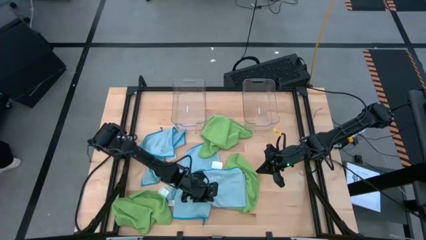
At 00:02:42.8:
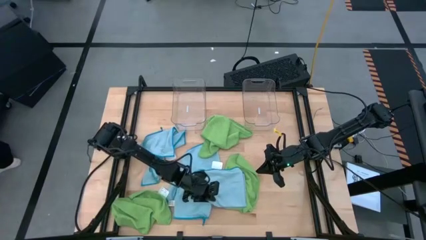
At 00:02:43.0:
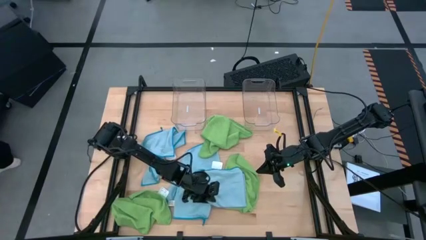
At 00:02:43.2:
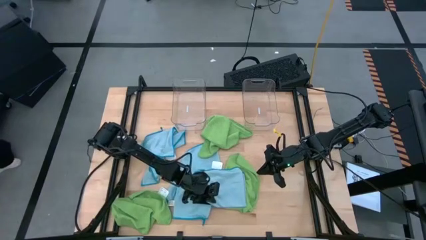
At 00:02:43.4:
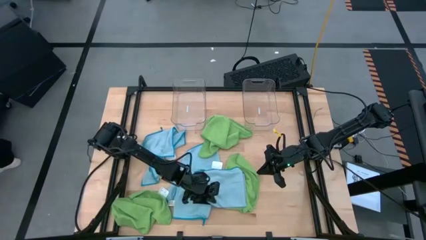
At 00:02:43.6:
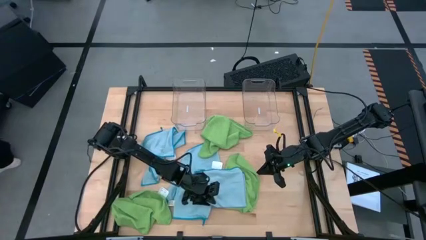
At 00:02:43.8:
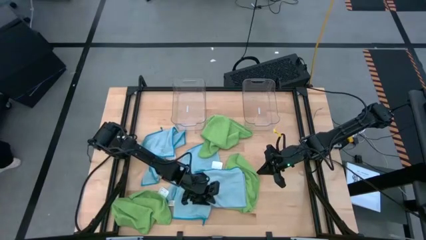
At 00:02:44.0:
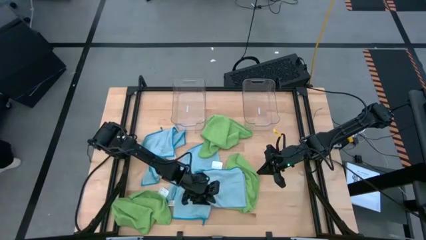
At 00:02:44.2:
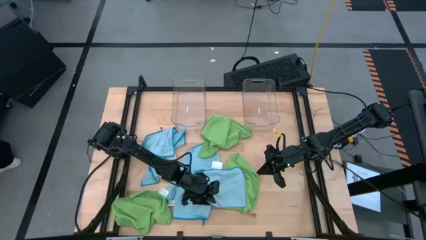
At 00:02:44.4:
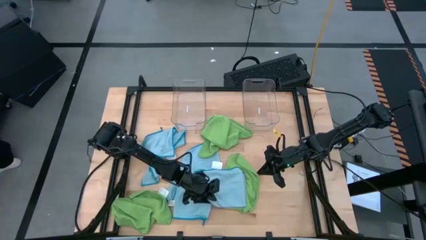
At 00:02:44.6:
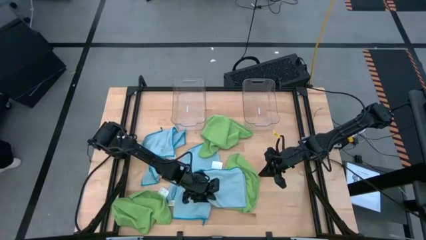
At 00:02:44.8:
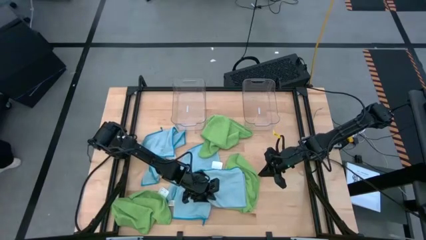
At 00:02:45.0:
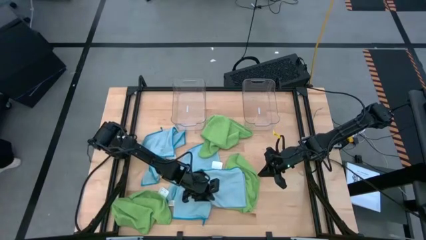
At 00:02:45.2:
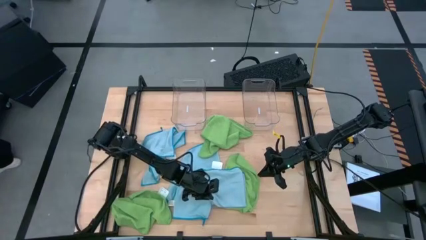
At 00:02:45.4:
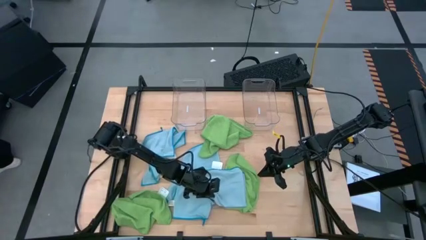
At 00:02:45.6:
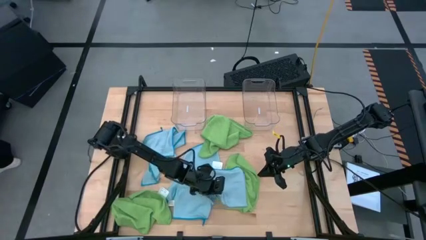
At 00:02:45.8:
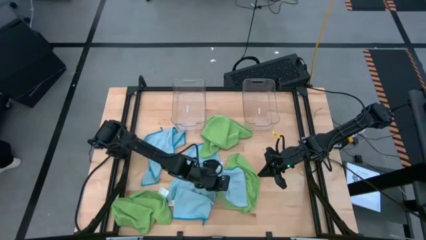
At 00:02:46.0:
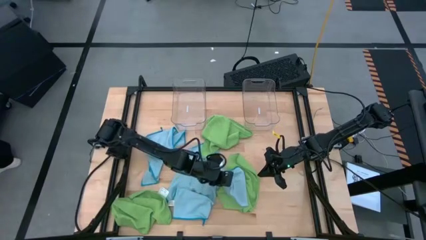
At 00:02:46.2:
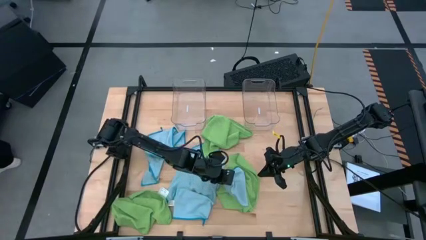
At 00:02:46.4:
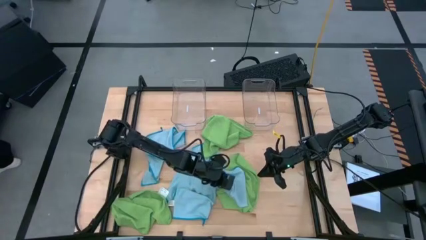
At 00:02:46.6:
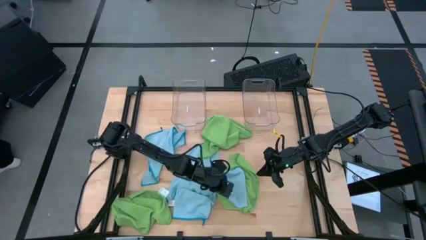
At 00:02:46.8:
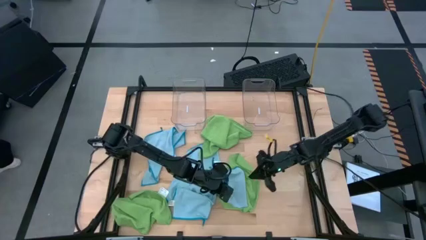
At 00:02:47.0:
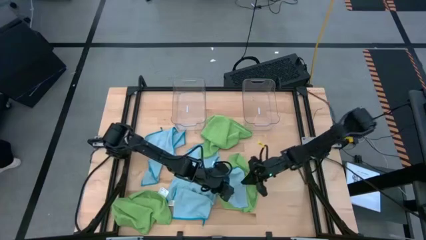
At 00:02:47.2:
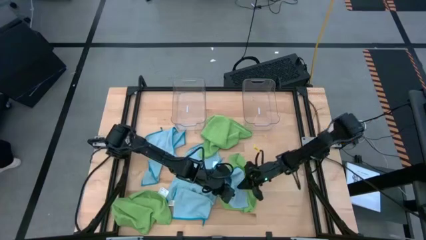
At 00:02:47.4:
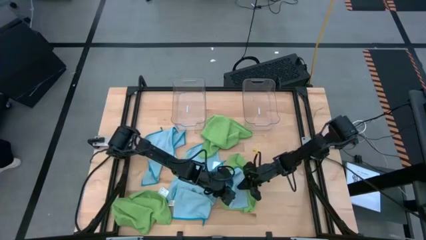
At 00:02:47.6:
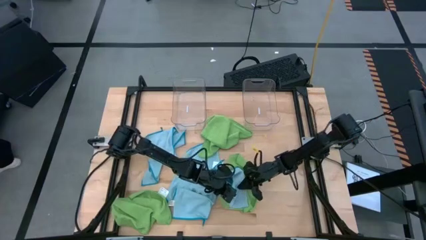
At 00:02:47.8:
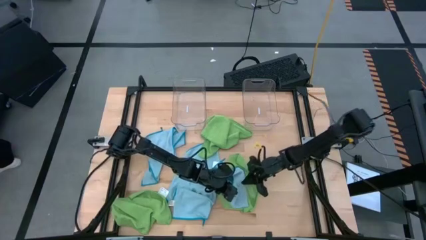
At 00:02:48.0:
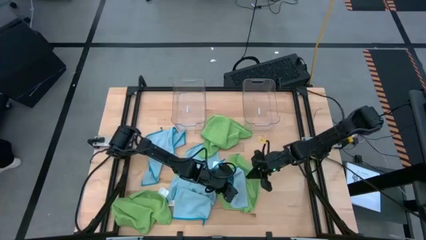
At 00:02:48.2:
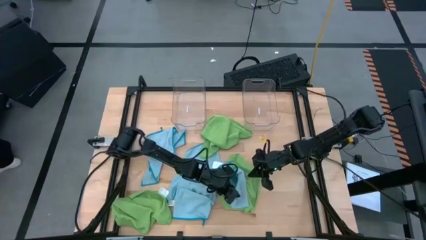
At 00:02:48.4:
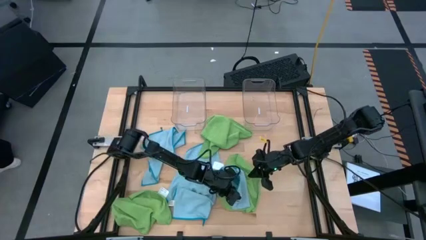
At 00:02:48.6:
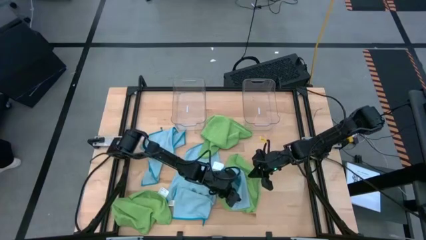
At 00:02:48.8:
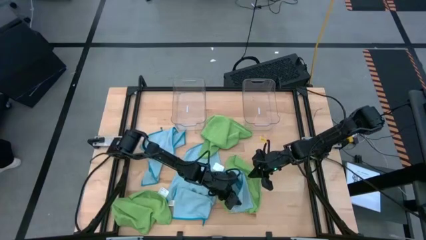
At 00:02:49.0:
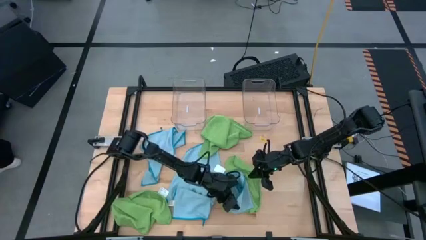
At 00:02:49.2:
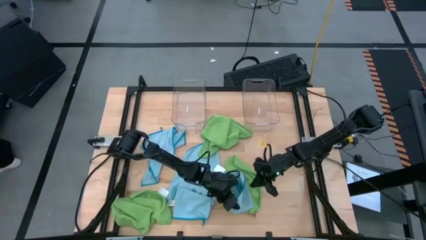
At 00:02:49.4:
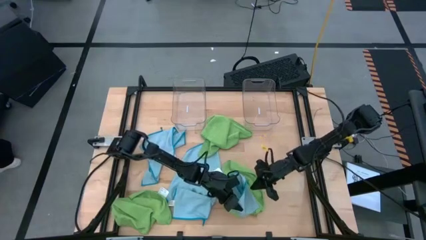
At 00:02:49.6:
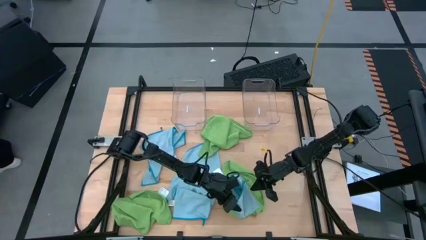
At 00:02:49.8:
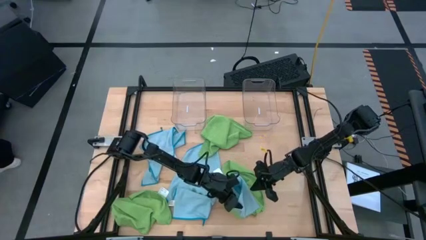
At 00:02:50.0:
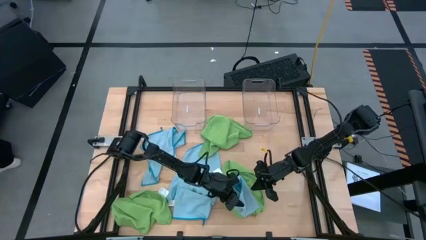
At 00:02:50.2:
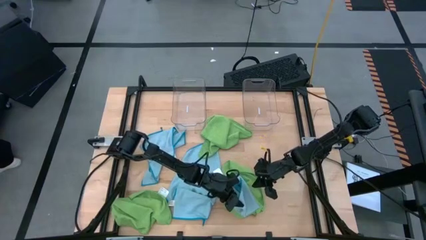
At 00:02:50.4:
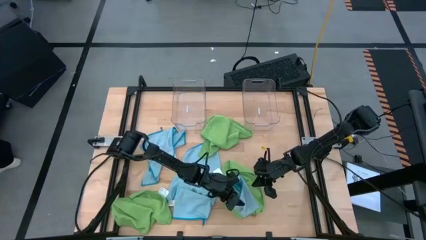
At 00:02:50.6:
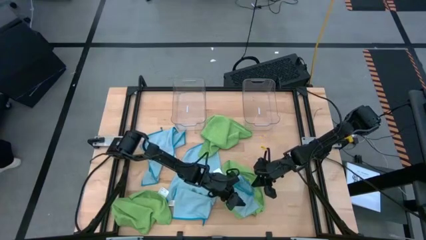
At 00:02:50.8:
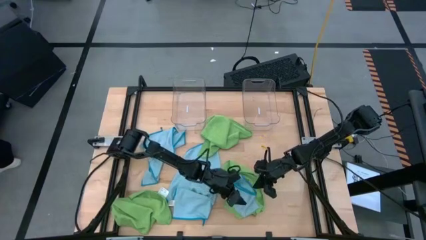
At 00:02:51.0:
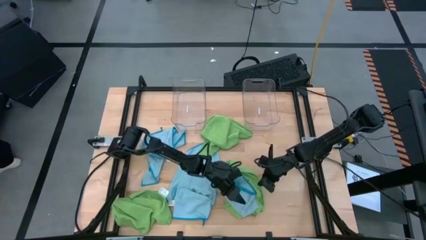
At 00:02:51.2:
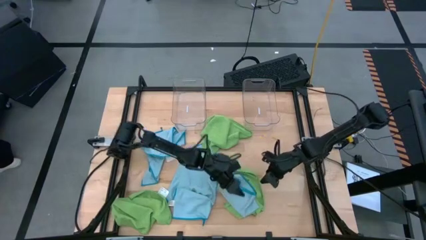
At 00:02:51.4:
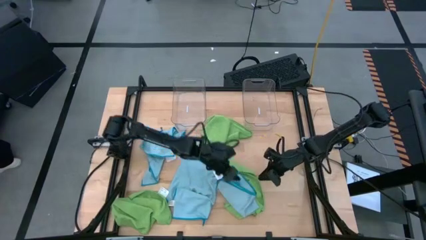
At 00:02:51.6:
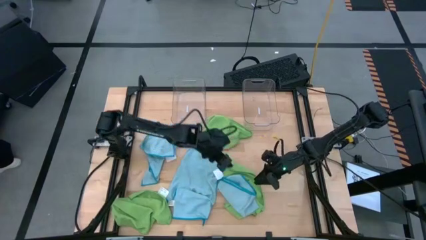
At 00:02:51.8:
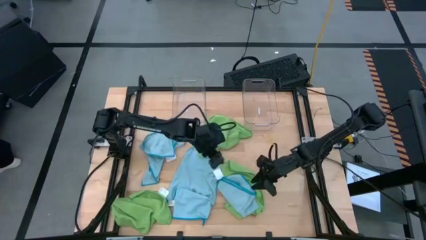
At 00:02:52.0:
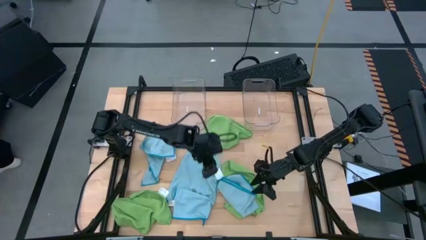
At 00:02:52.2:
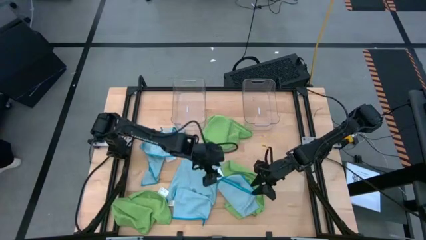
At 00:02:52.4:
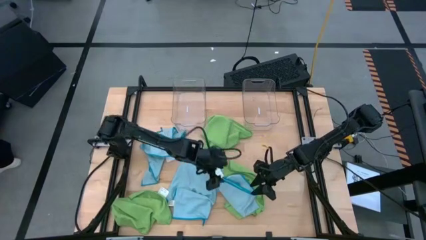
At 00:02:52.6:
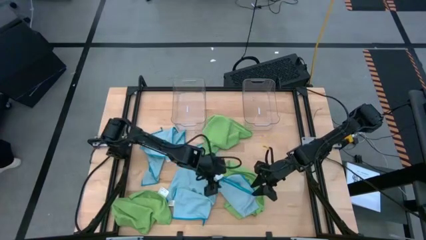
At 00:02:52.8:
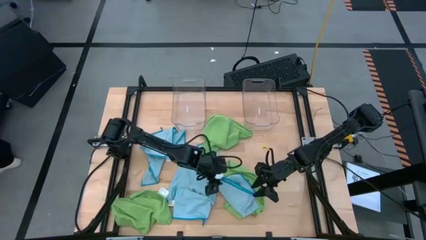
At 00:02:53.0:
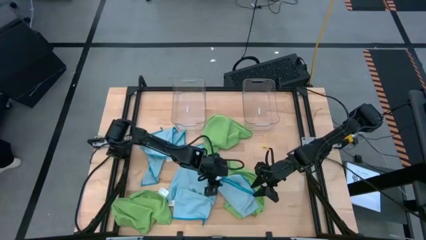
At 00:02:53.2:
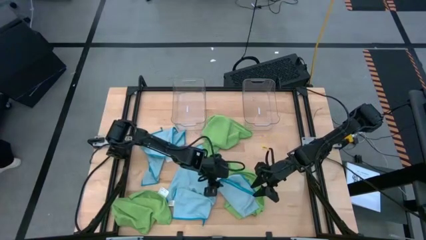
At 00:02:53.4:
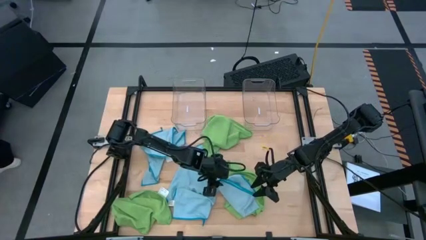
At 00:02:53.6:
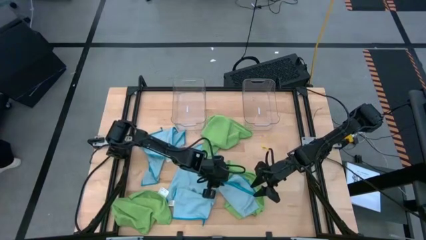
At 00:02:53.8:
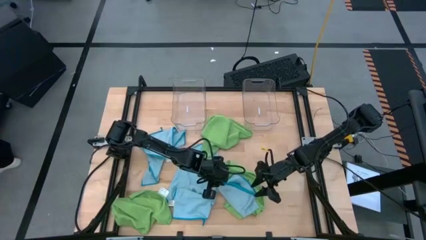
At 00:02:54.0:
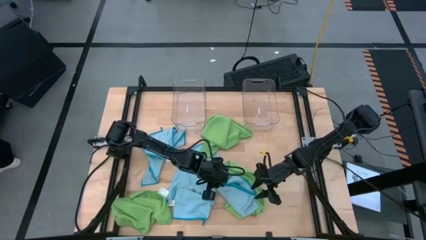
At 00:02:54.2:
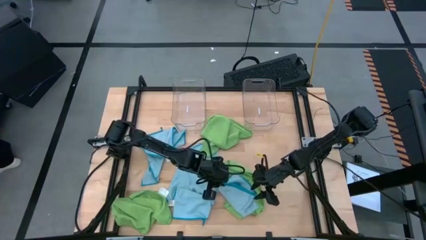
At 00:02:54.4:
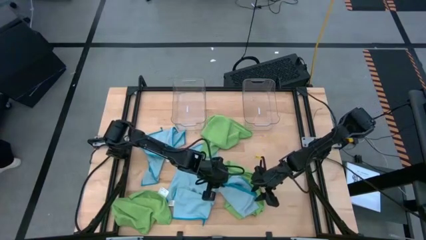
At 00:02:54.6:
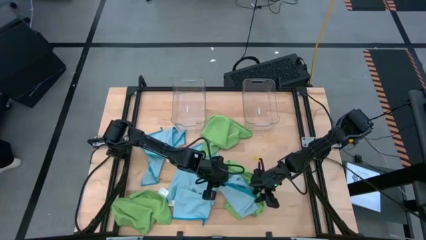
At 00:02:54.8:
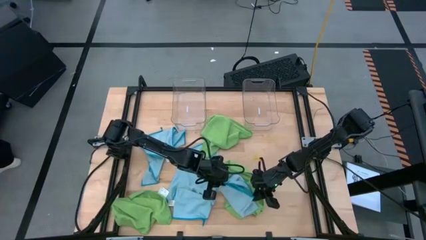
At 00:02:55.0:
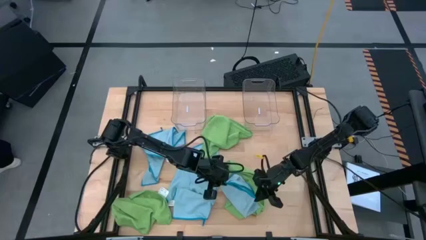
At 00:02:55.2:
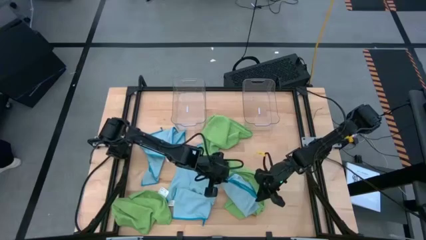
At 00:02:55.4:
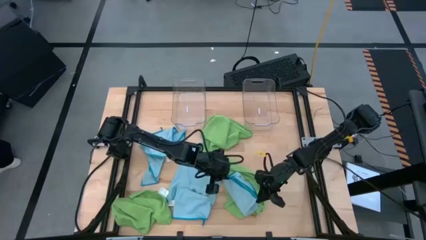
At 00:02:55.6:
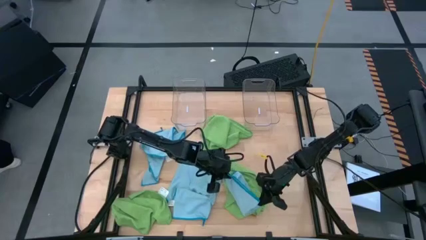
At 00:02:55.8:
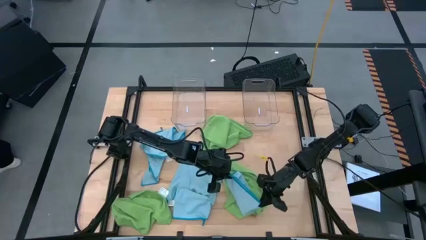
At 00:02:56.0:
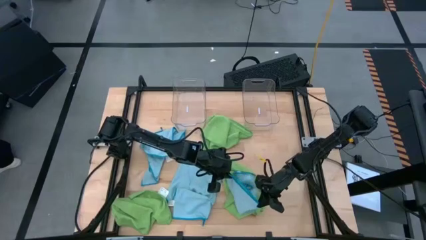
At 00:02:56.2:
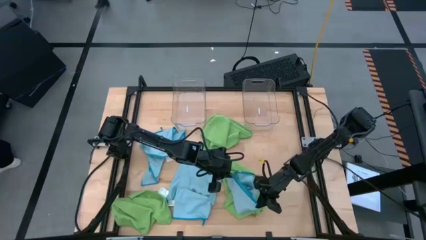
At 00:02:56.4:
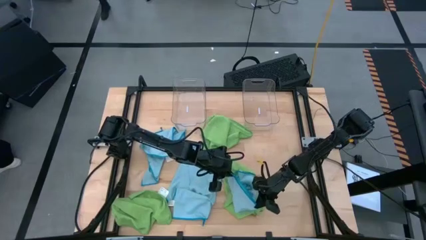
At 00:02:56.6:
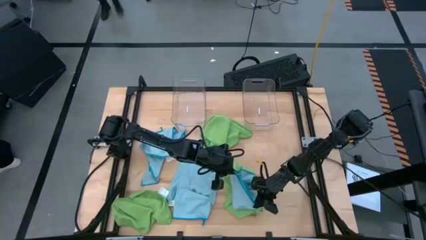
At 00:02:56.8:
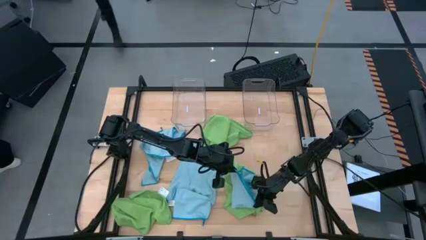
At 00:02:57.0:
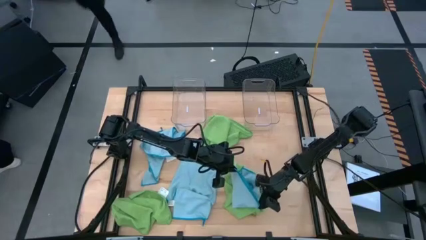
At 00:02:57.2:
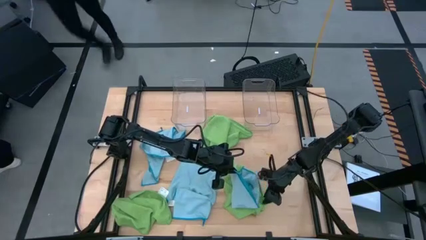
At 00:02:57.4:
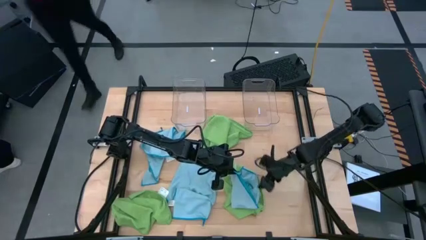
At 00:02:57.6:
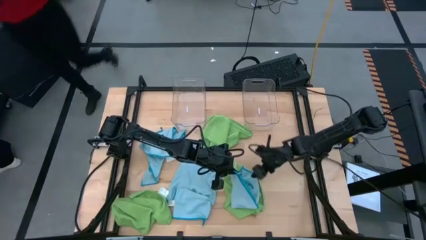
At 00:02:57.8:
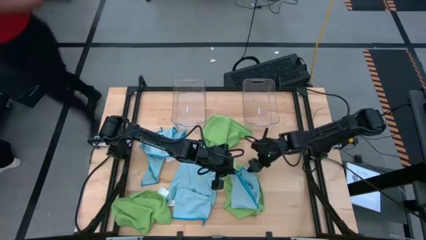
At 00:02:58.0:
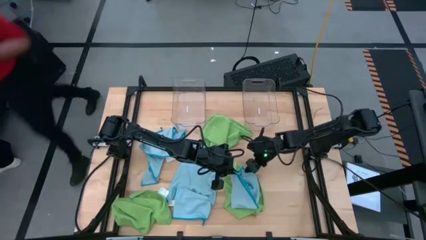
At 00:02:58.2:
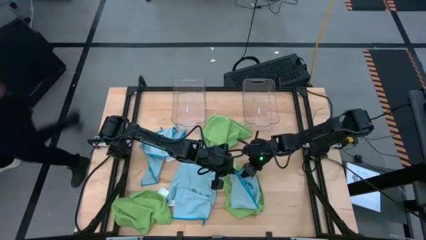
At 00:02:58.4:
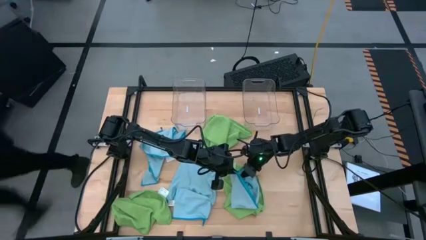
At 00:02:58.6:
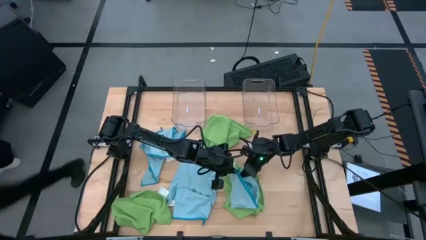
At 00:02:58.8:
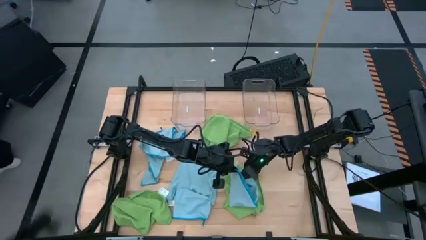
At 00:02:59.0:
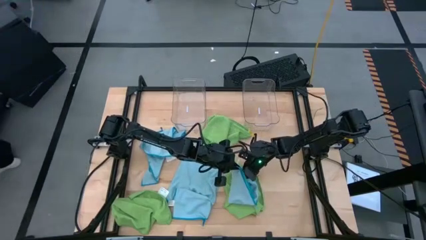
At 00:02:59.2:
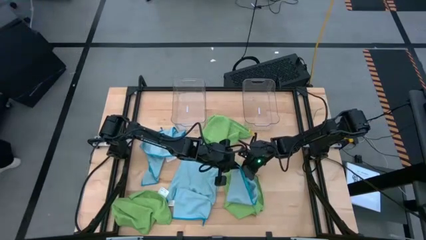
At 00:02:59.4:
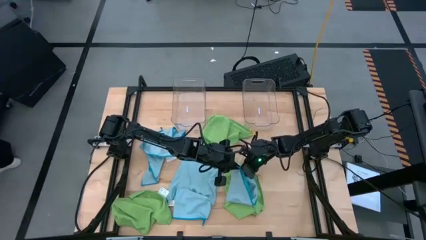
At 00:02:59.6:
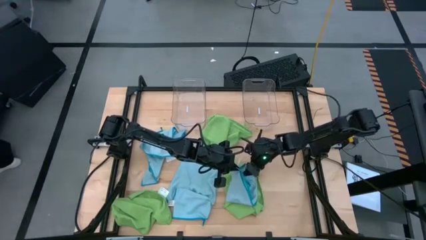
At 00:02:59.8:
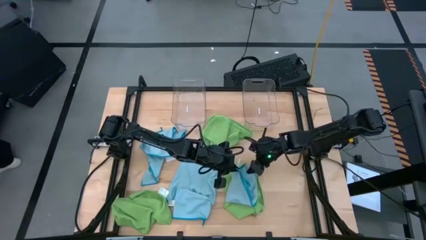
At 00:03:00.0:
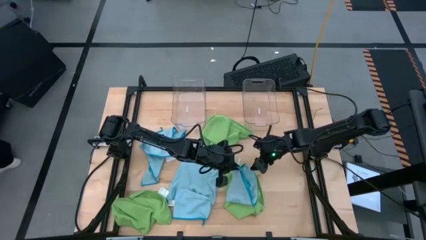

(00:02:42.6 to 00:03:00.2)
Task: Fold microfiber towels
Fold the right blue microfiber towel
